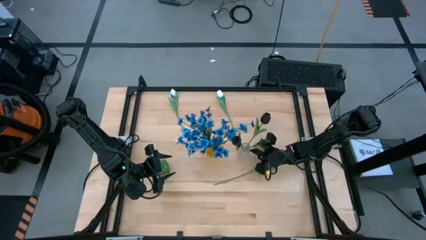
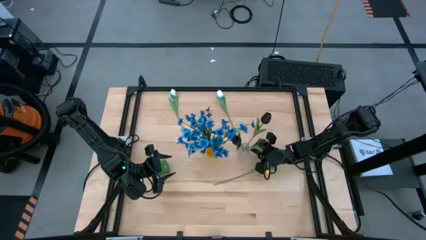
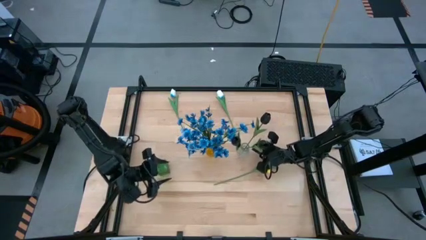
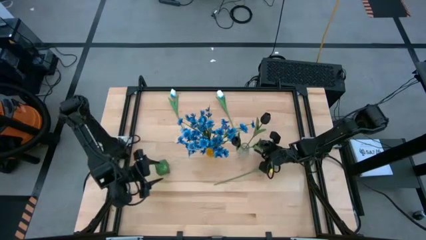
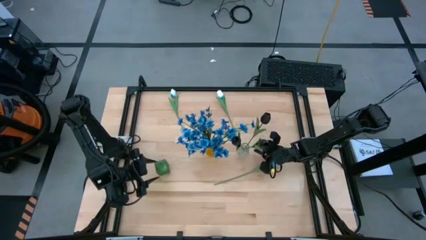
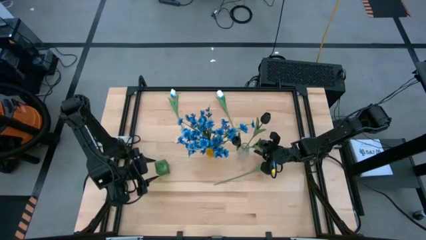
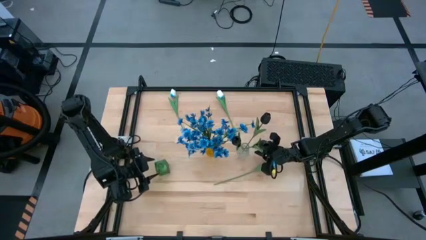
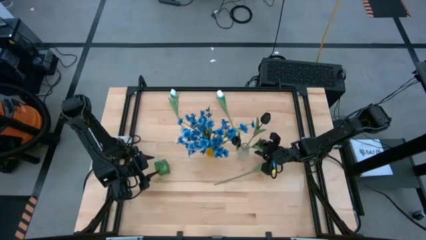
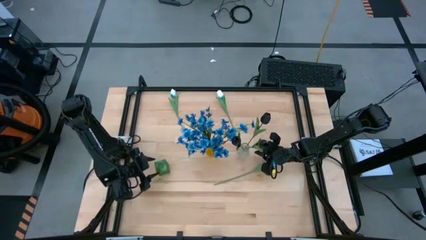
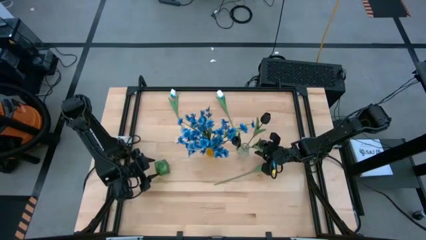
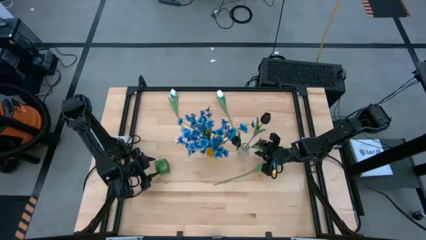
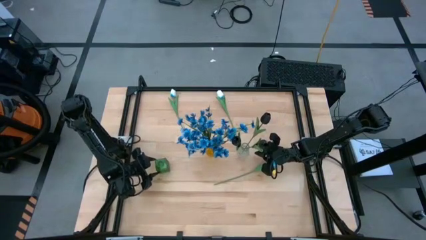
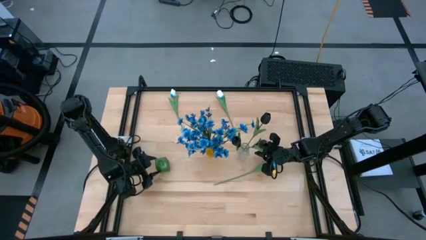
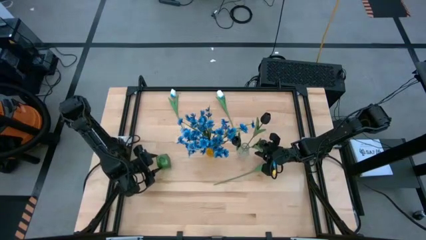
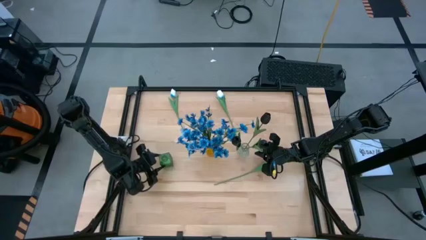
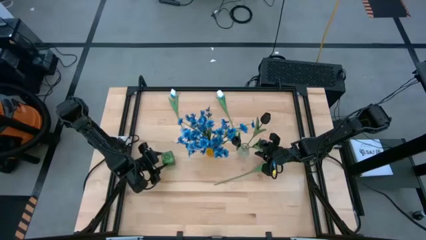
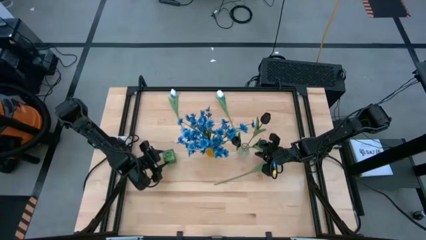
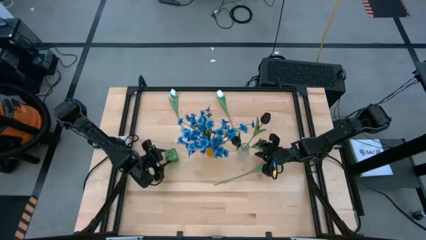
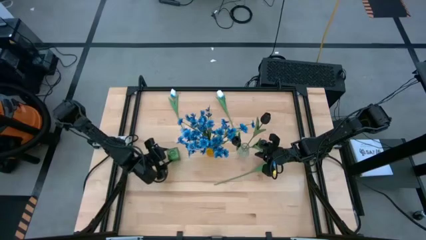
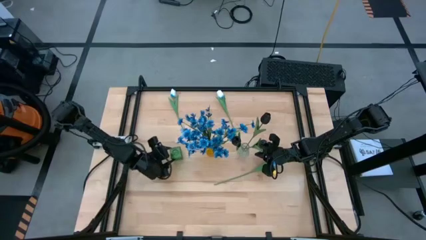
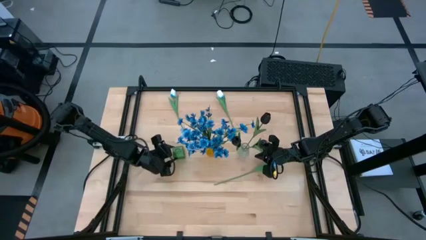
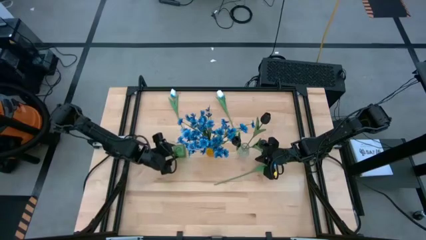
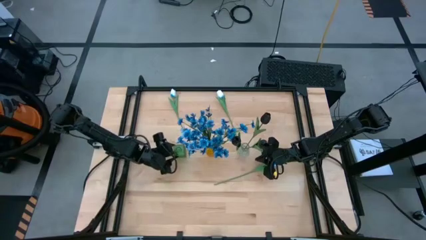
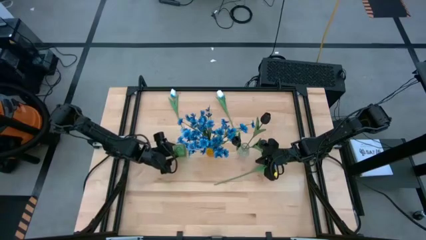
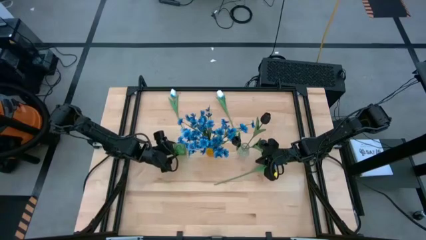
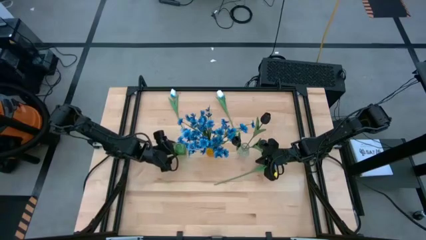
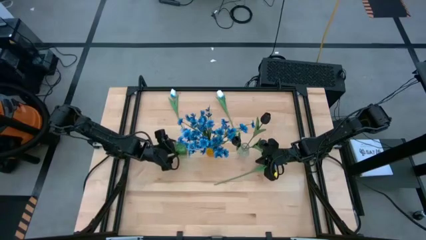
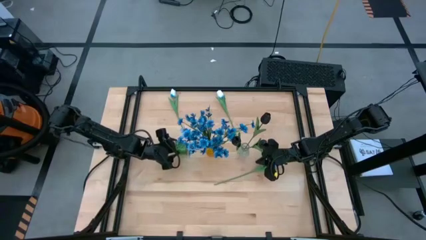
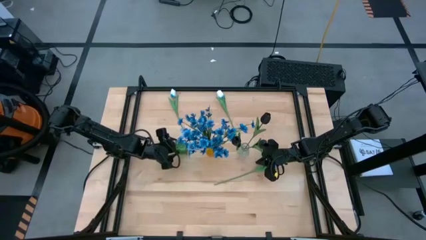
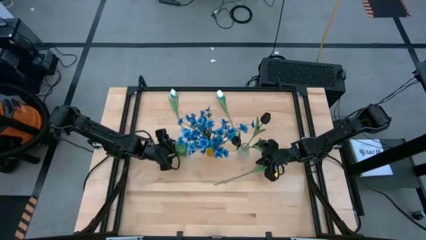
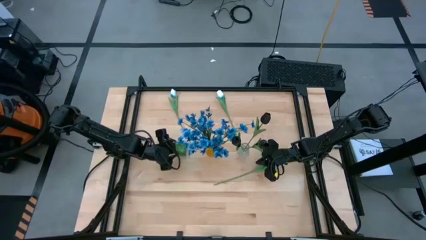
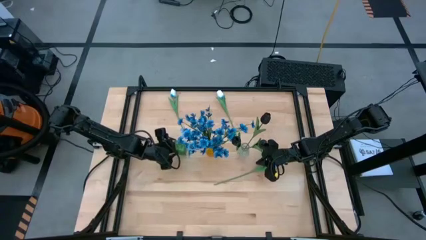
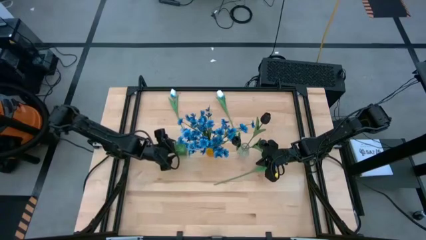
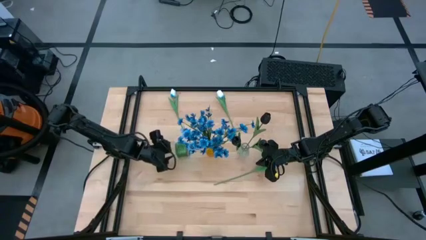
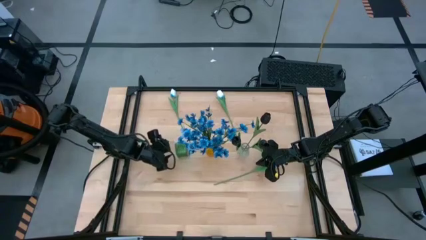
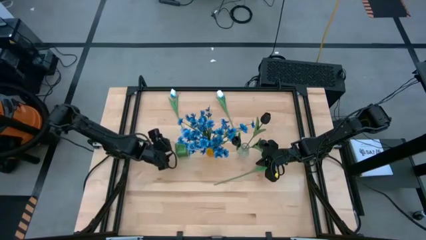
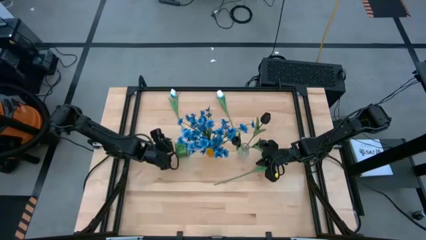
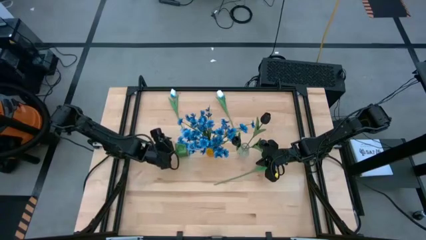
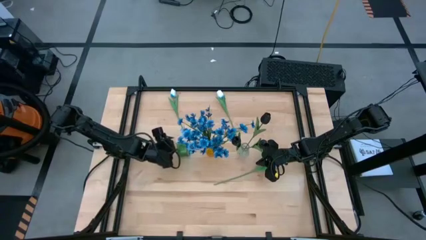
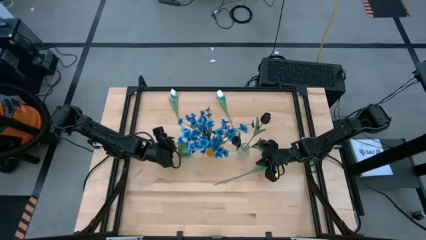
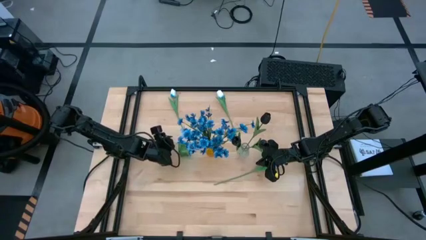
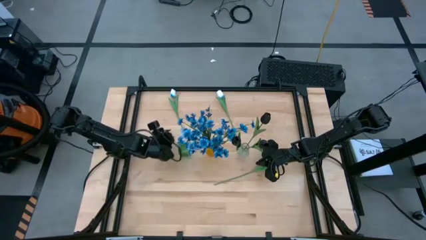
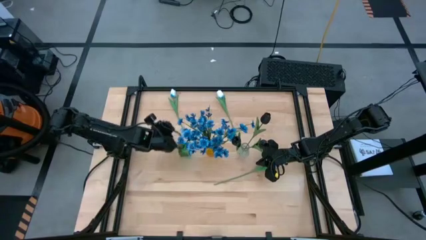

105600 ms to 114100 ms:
Task: Sort flowers into vase by color
Adjust the green vase on the table

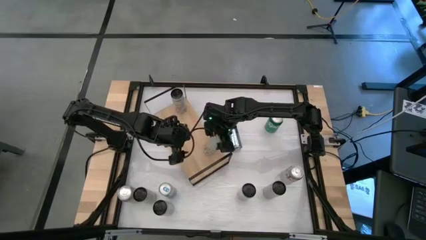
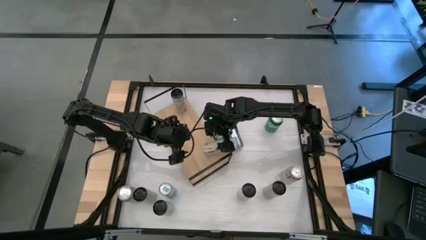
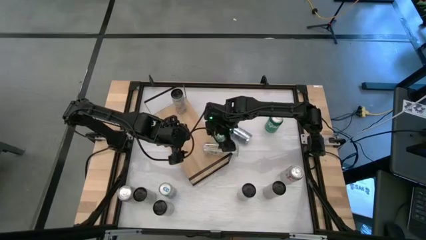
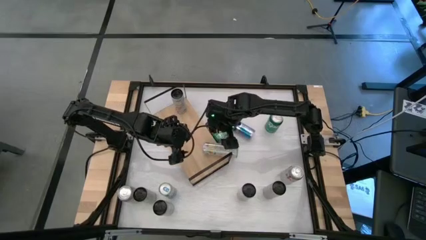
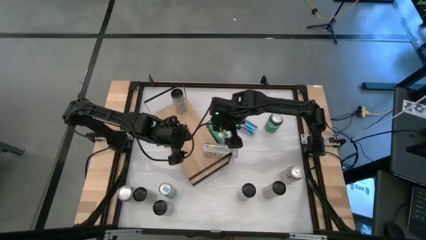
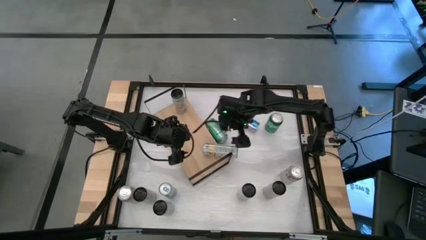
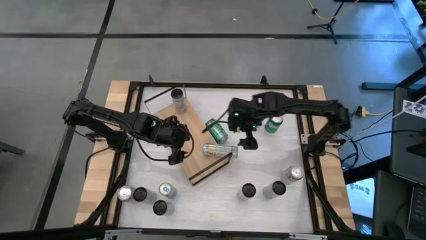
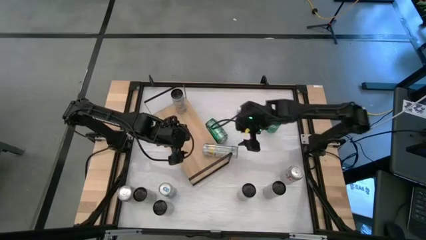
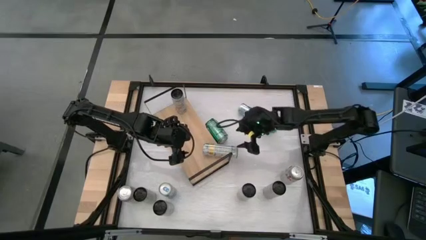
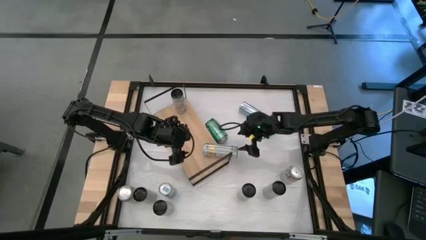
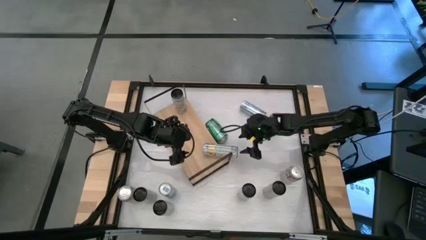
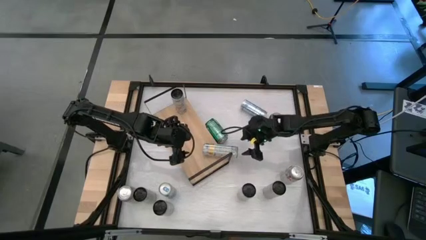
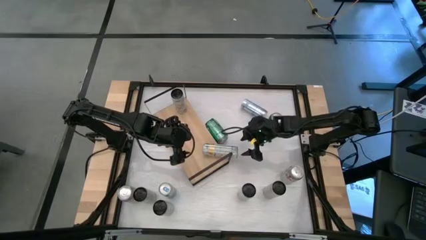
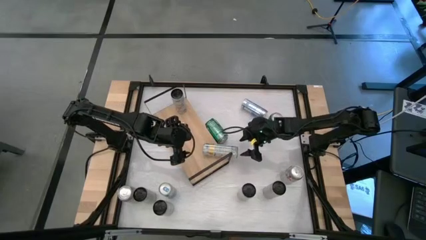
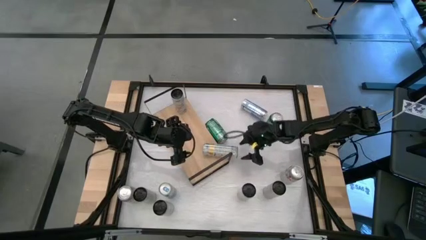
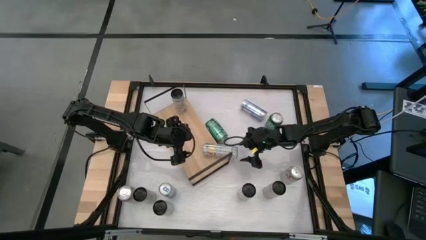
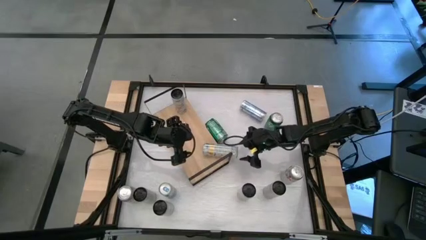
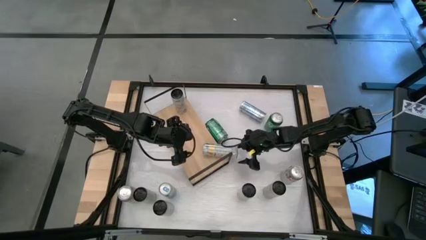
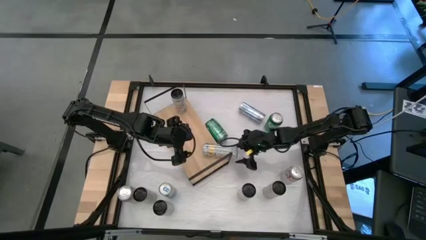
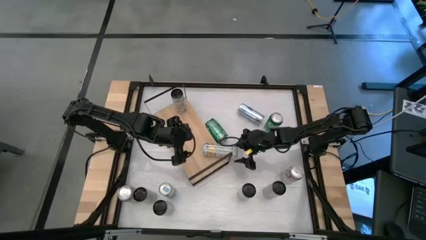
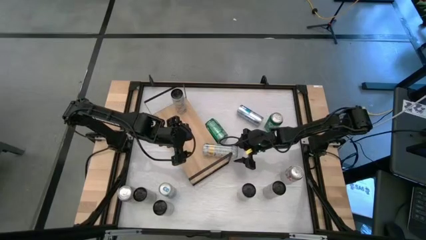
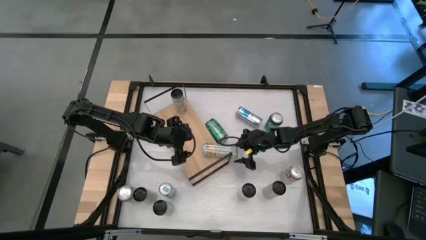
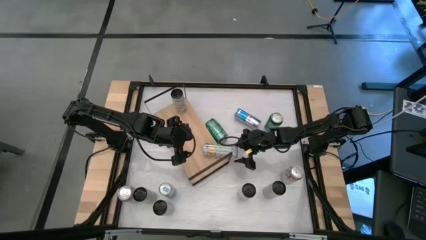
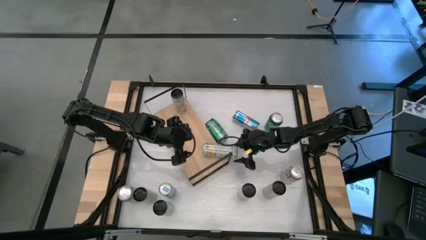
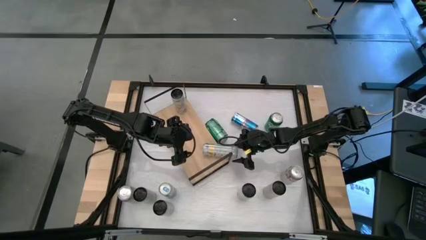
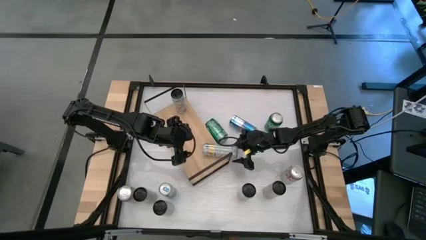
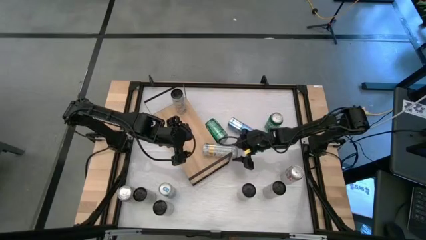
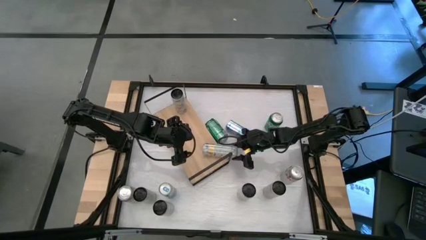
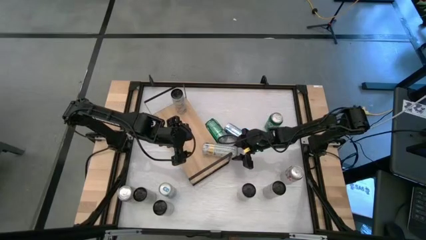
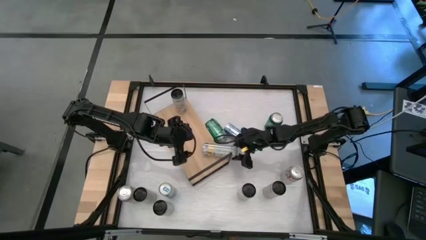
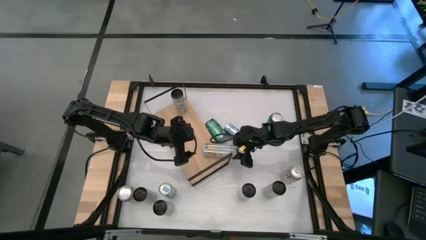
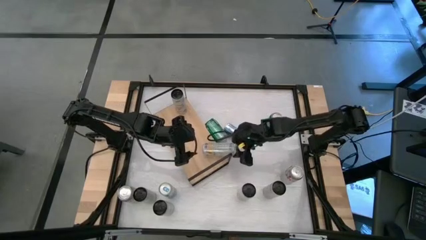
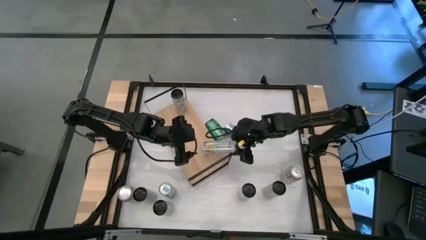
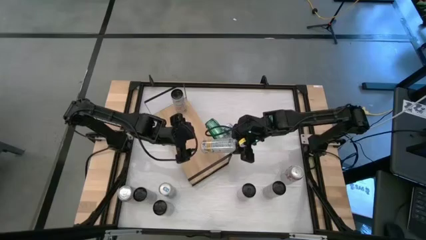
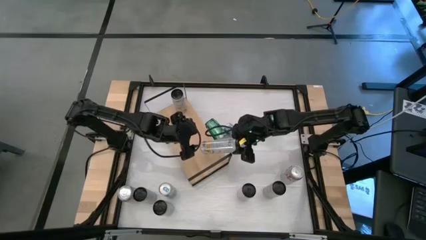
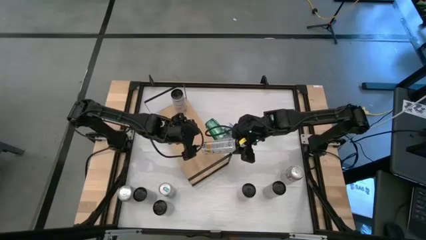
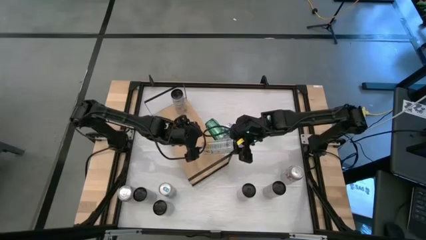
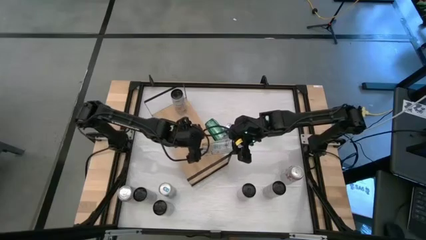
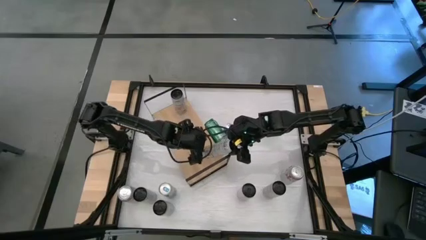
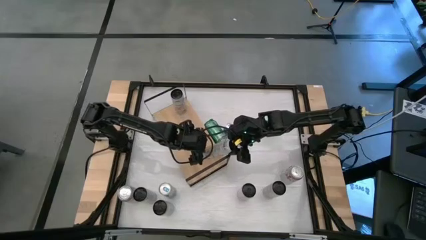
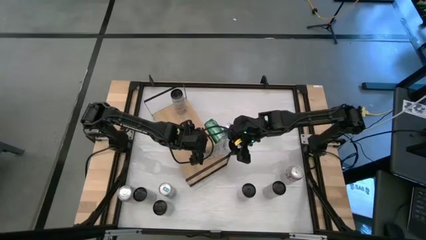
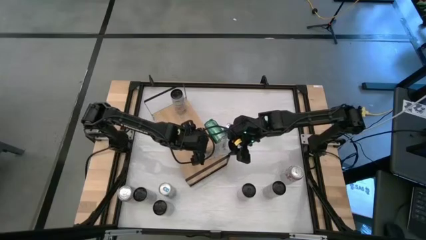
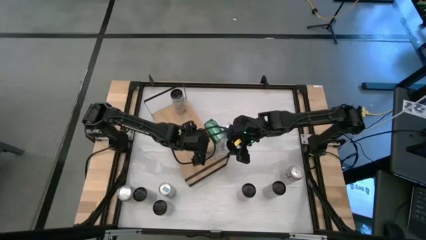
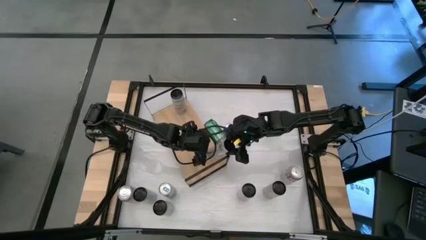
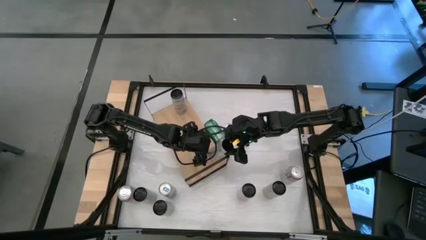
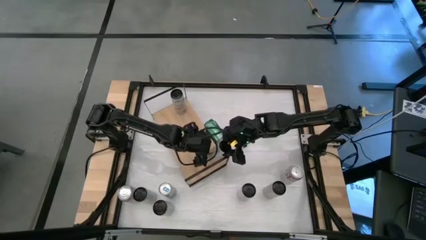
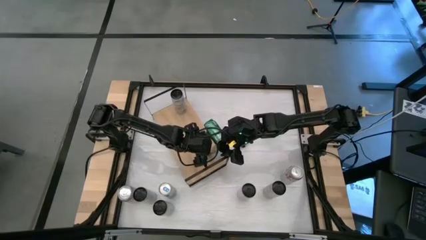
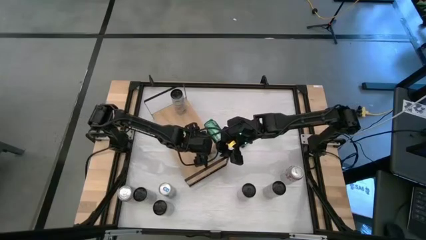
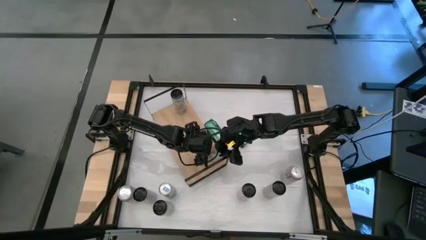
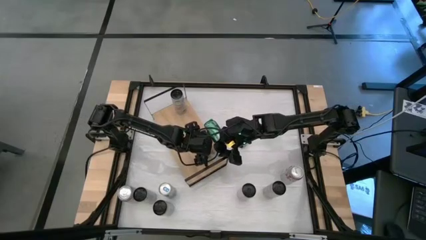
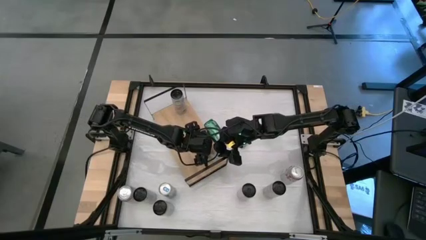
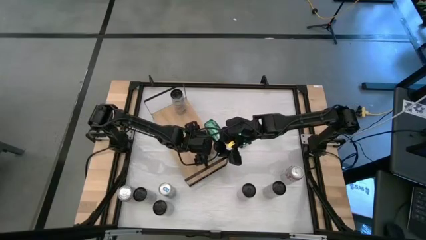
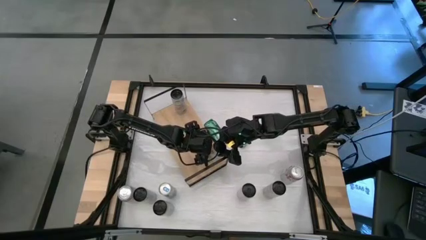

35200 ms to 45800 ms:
Task: Place canned beverage on shelf
Put the white yellow soda can on the shelf
